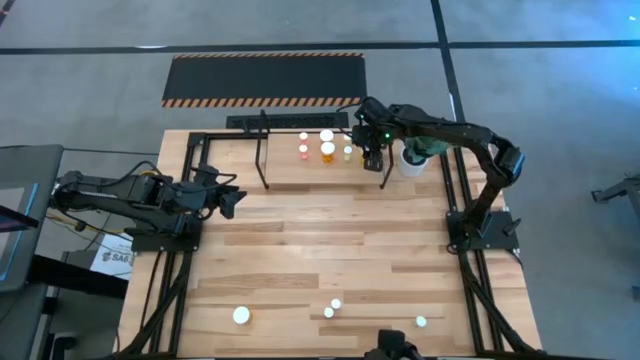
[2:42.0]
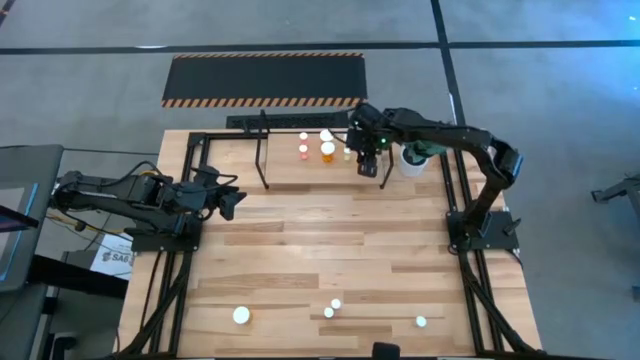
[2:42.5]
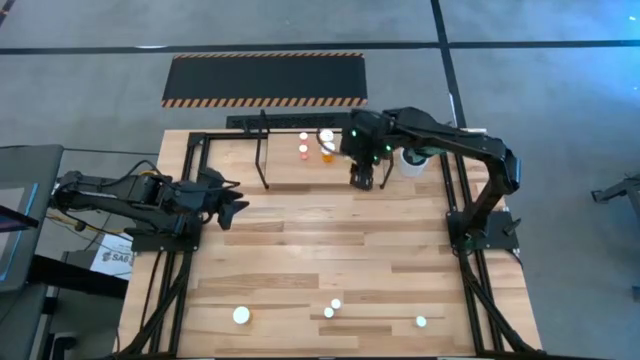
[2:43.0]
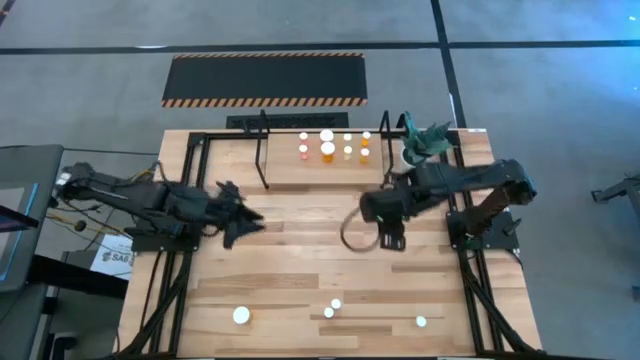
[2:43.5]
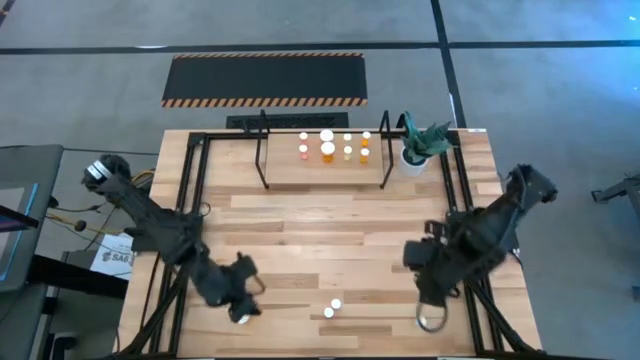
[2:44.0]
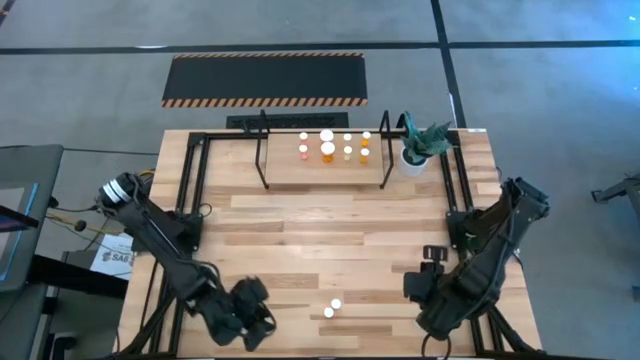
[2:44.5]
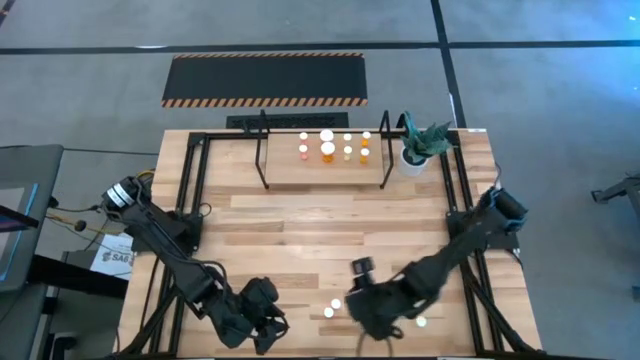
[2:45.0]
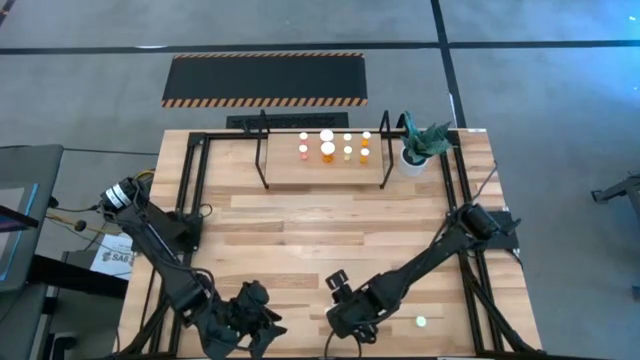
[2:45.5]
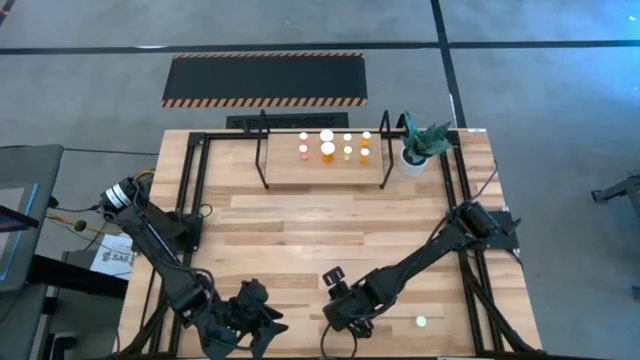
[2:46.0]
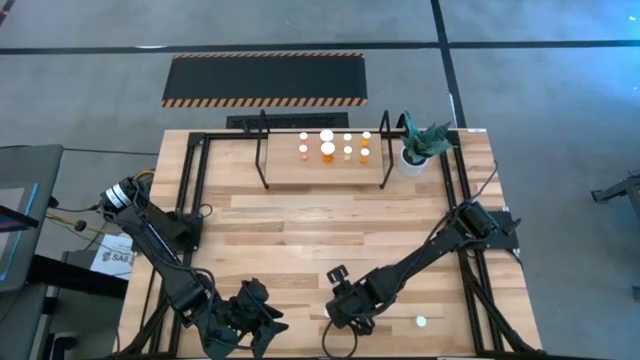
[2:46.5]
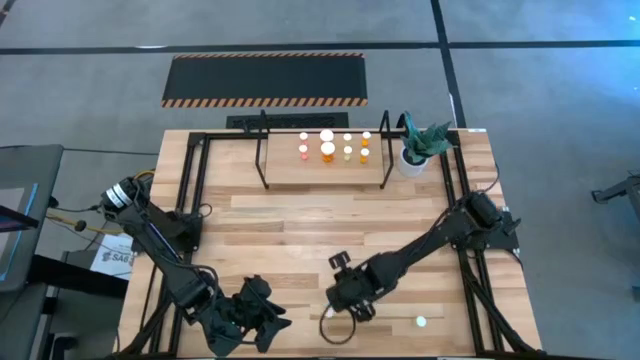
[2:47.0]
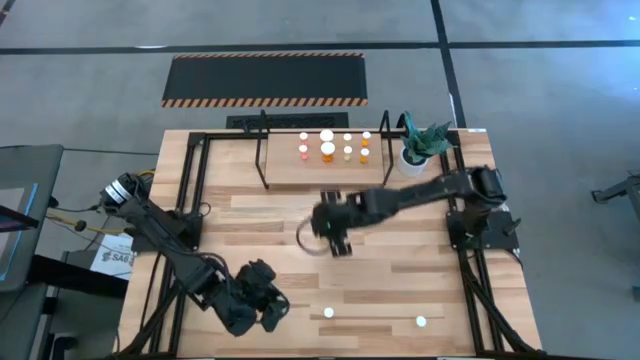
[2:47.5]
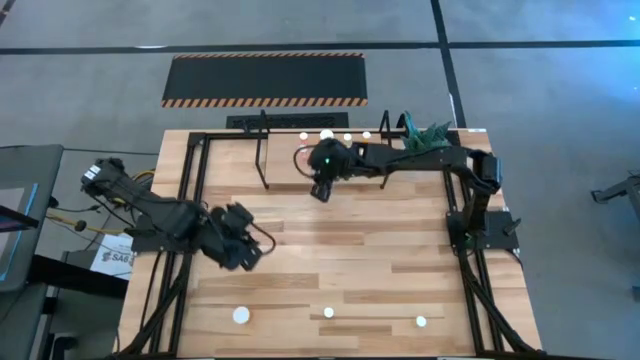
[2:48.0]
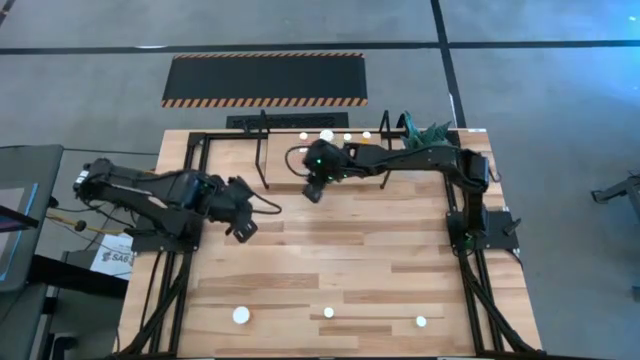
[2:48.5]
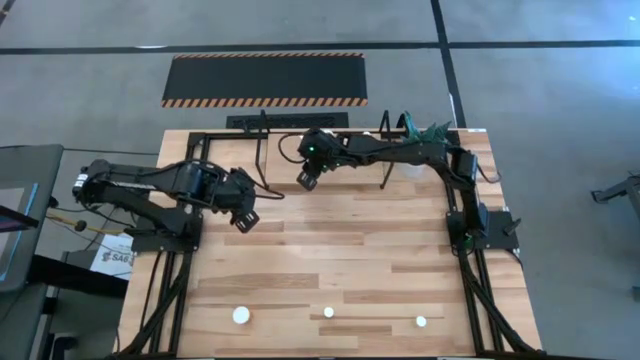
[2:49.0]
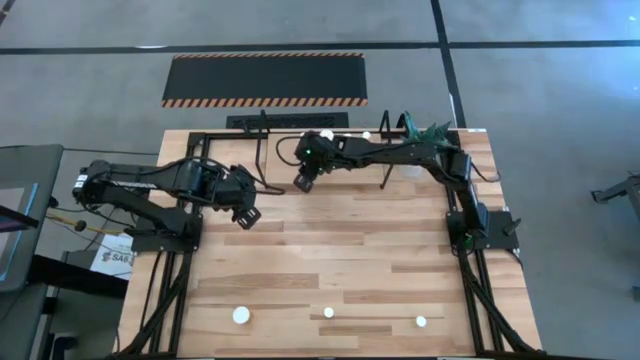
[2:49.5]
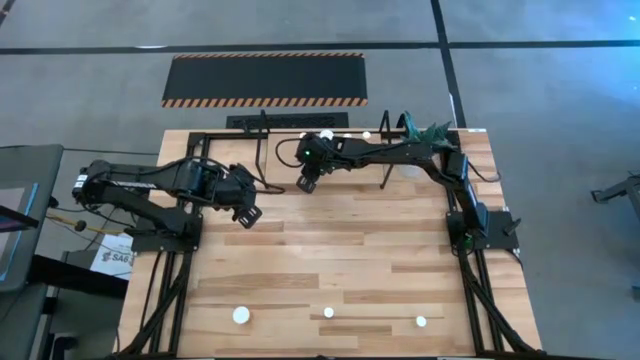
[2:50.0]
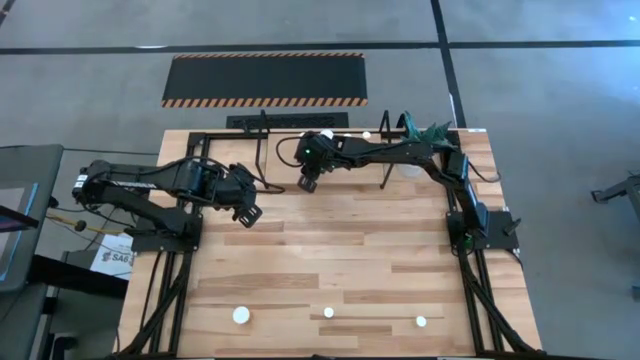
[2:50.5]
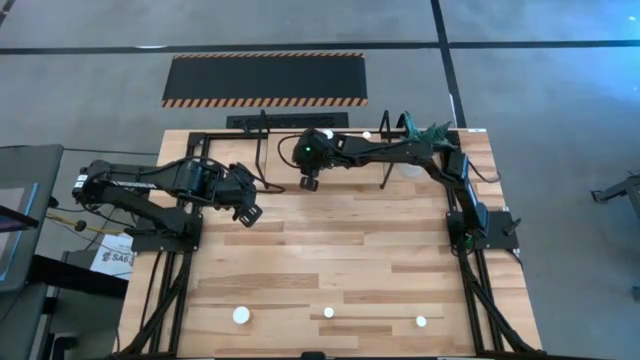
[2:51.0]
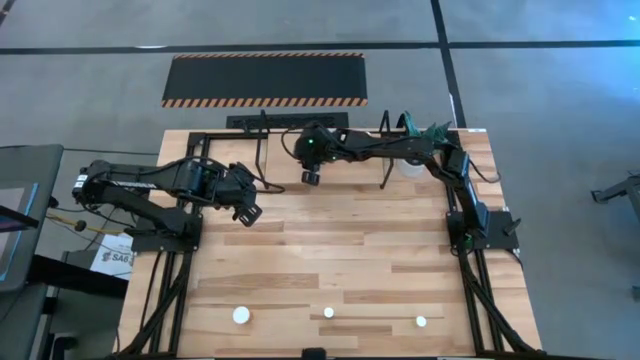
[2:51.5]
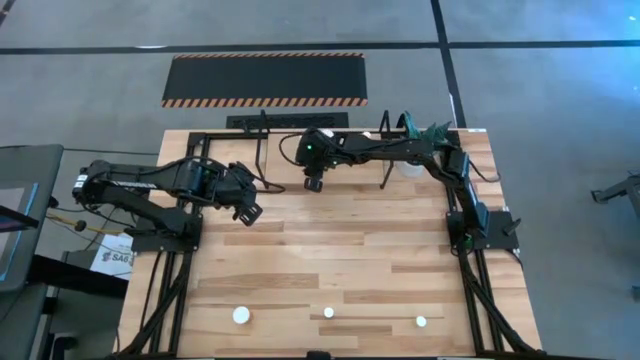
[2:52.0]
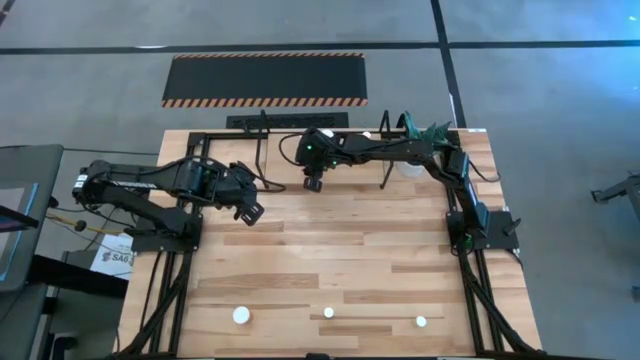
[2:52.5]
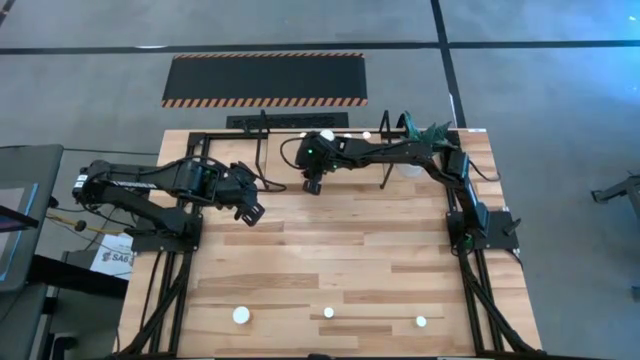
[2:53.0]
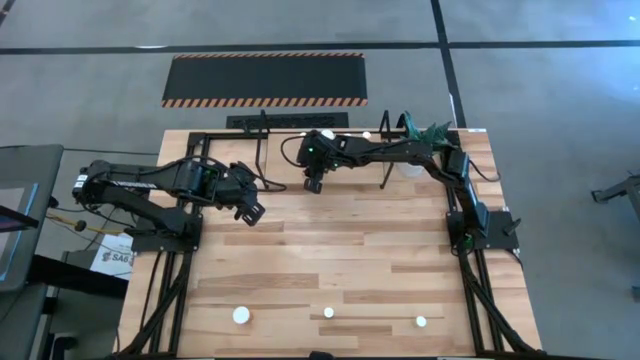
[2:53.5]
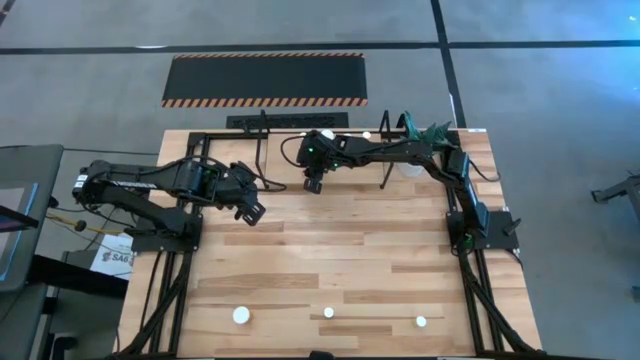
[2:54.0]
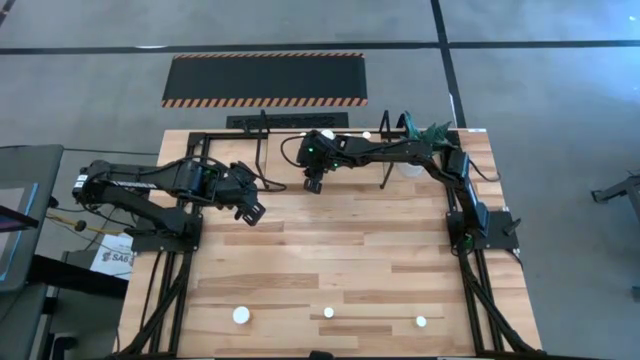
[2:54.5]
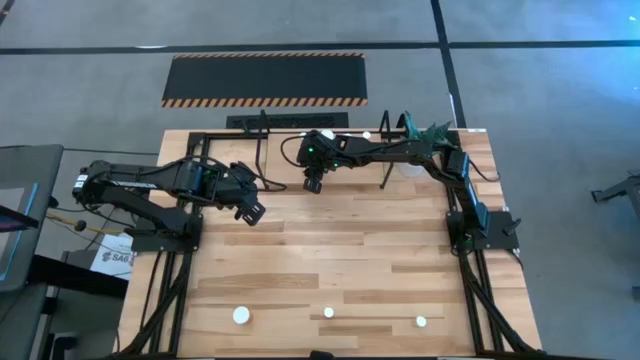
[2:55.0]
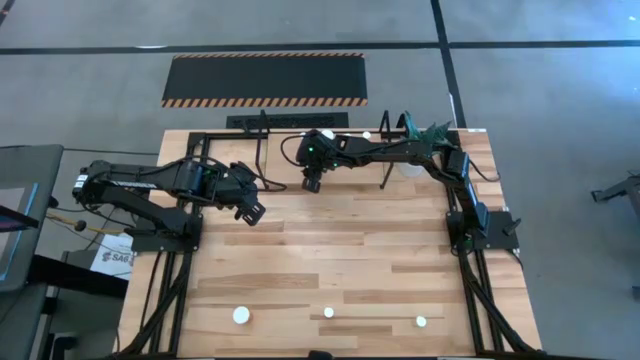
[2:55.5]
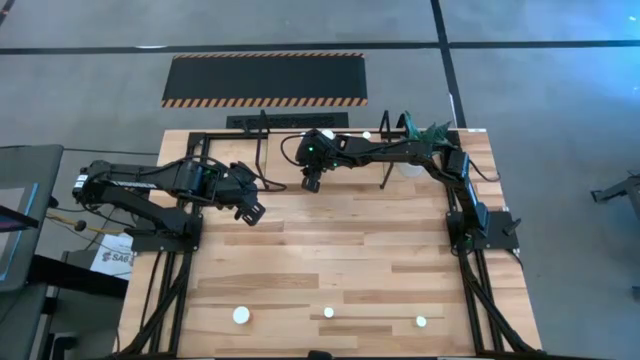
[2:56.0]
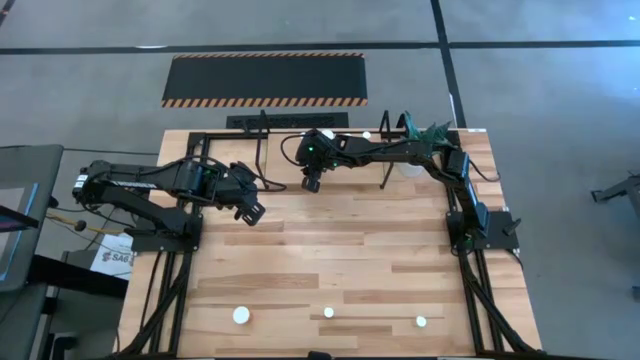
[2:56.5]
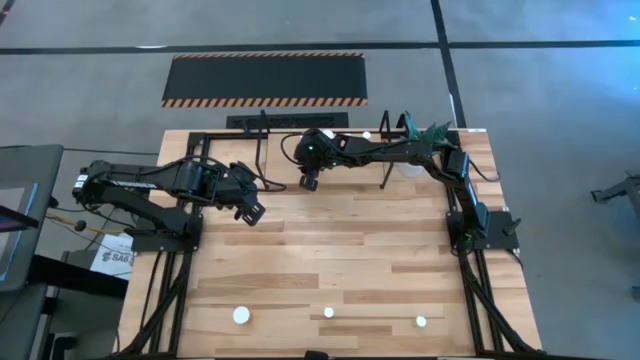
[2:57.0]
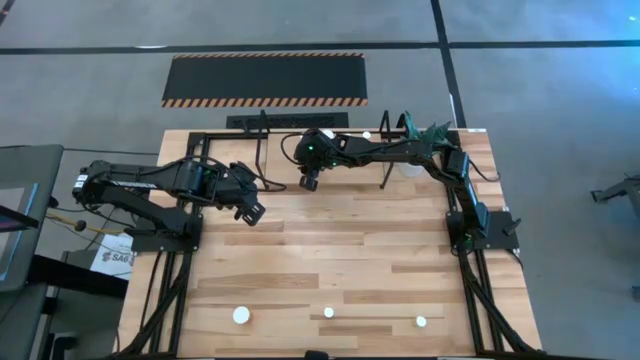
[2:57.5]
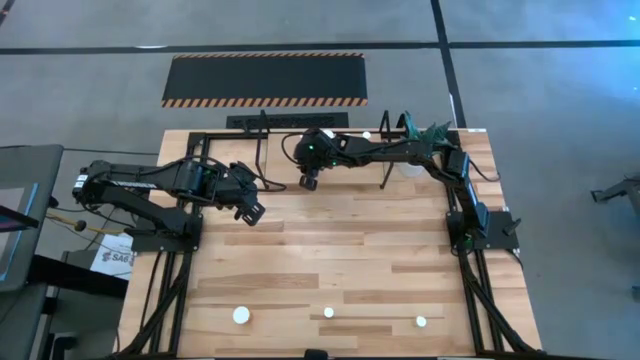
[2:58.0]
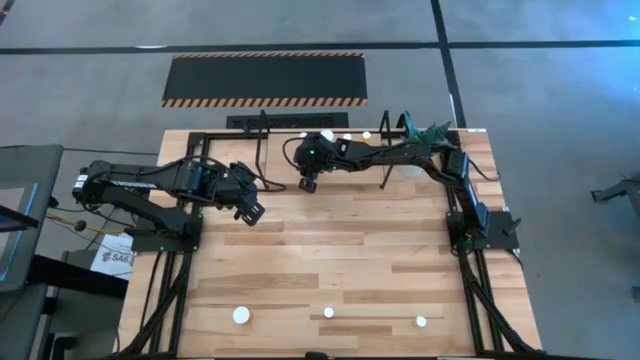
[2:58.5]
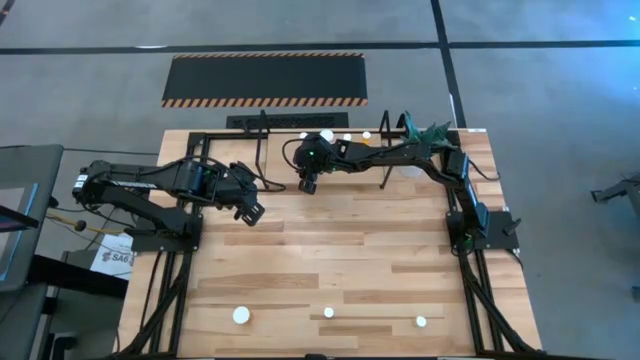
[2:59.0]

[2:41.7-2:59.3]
Task: Pick and place medicine bottles onto shelf by color
Put the pink pill bottle on the shelf aligned with the other pink pill bottles

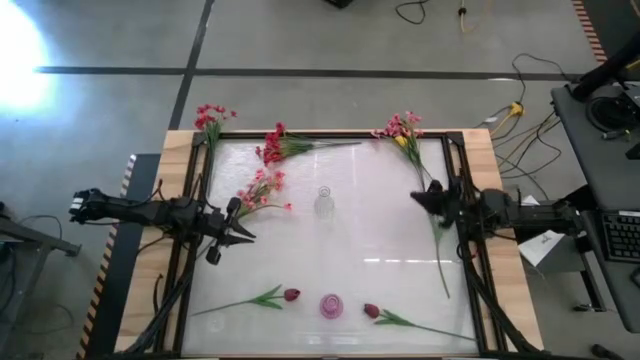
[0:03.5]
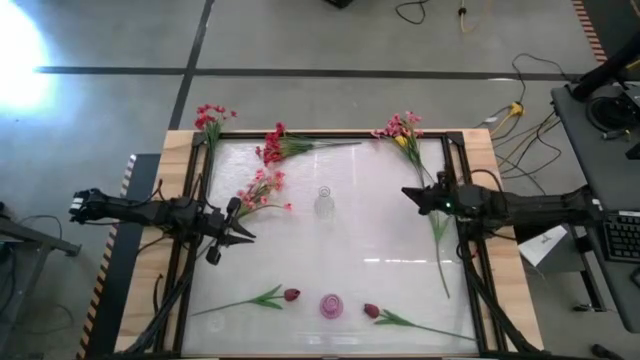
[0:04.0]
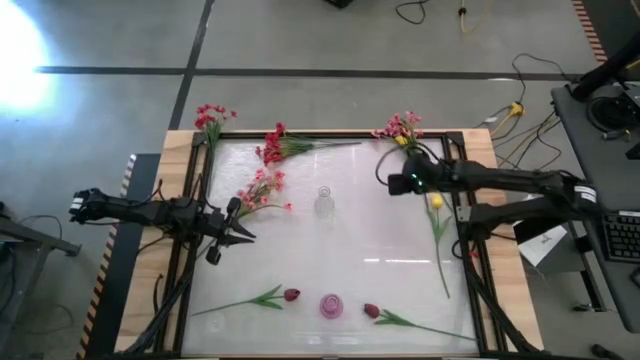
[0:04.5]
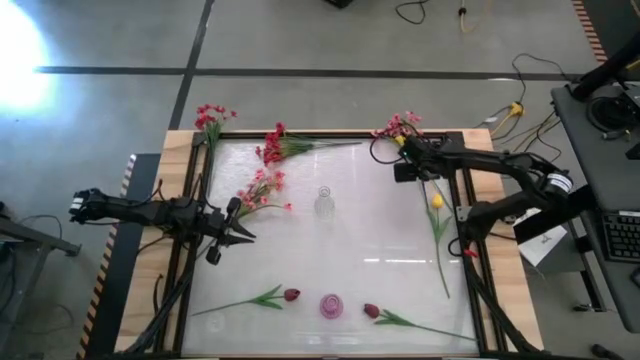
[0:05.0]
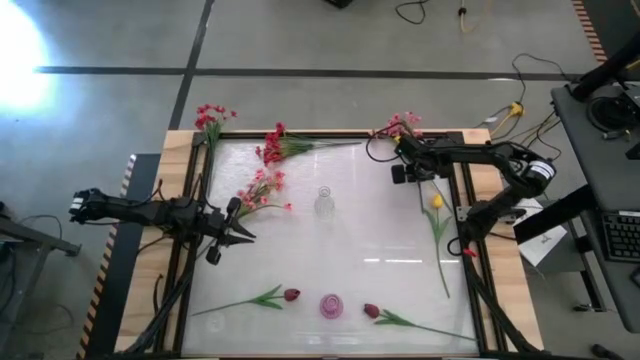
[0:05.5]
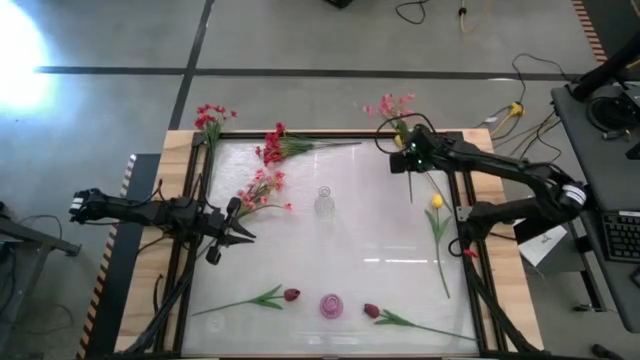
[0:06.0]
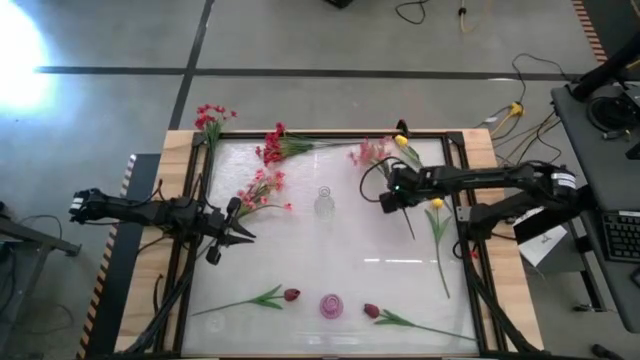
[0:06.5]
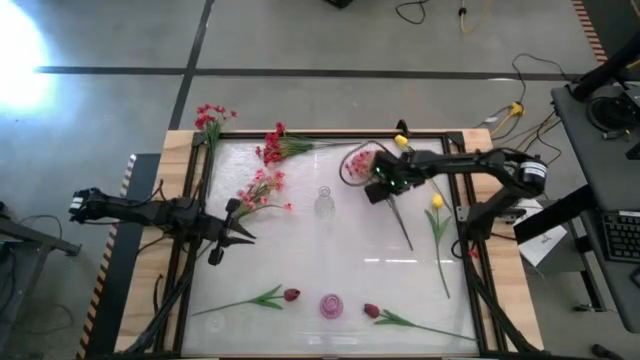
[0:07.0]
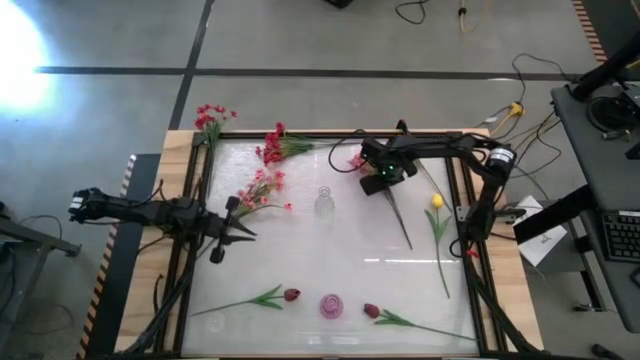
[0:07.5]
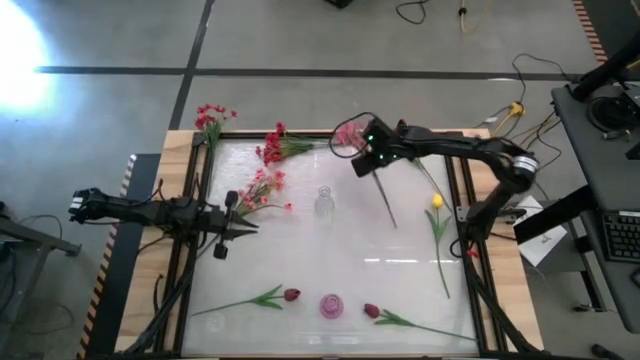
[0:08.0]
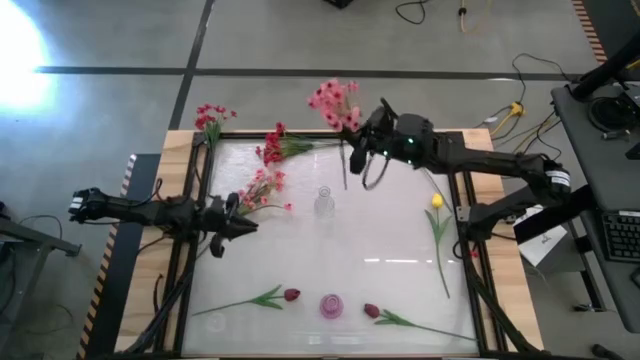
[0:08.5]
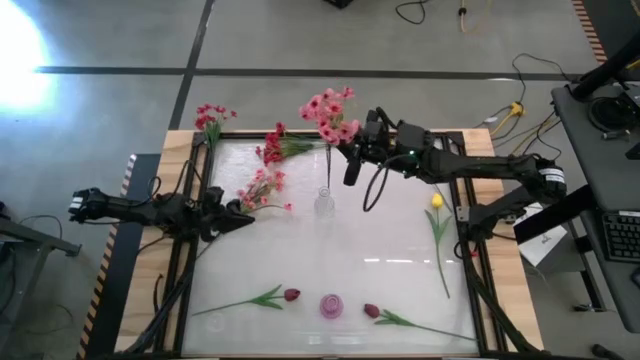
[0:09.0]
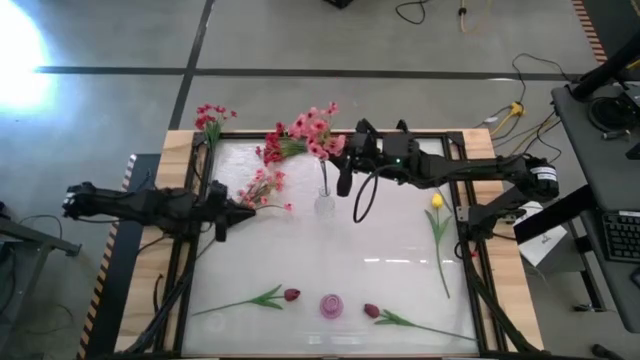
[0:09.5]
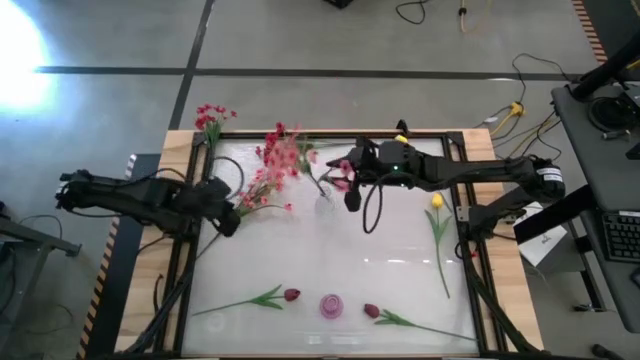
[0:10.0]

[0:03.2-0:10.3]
Task: Sort flowers into vase by color
Put the top pink flower into the transparent vase
